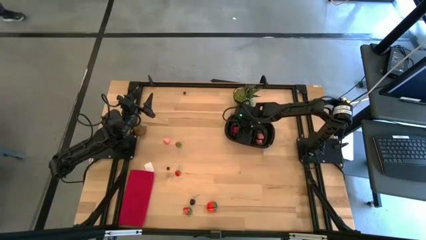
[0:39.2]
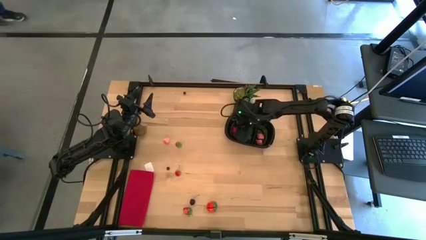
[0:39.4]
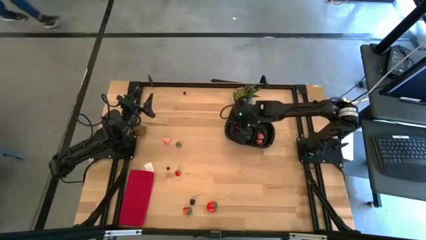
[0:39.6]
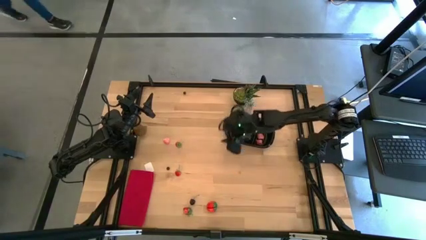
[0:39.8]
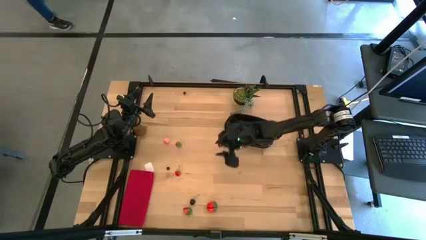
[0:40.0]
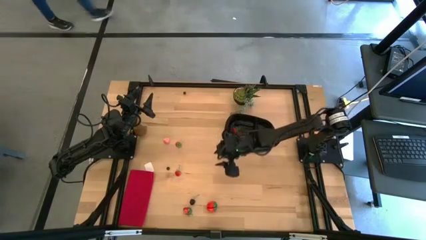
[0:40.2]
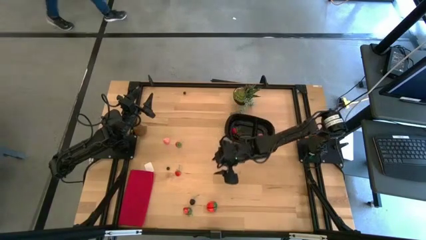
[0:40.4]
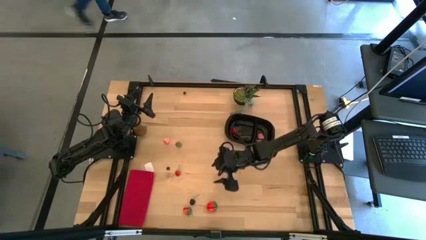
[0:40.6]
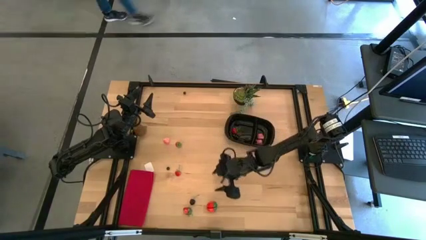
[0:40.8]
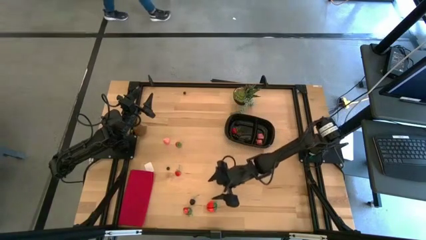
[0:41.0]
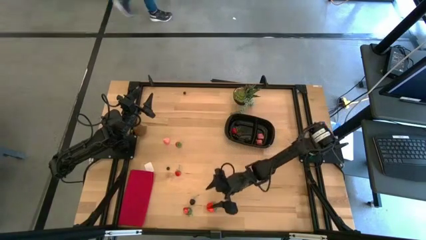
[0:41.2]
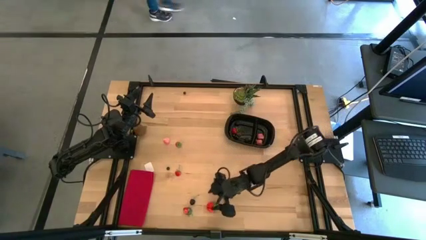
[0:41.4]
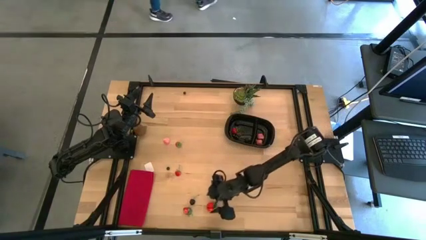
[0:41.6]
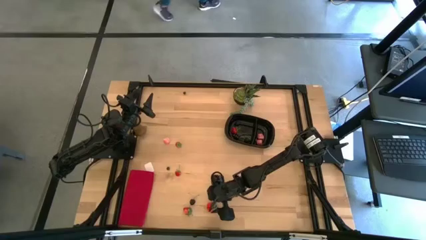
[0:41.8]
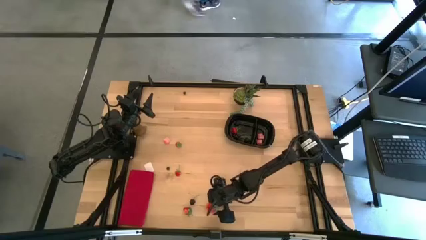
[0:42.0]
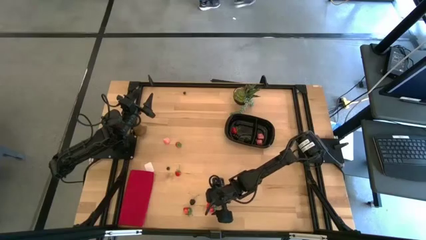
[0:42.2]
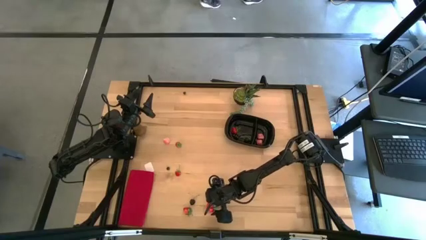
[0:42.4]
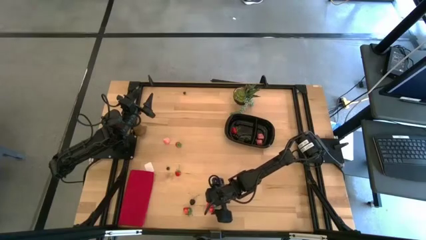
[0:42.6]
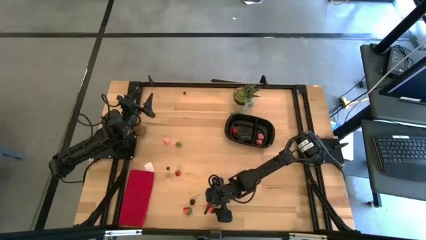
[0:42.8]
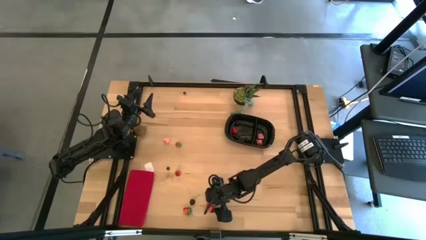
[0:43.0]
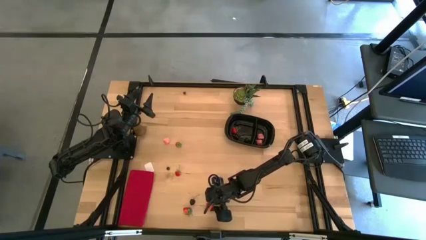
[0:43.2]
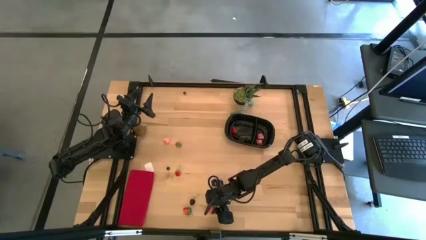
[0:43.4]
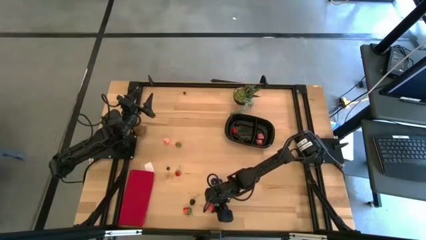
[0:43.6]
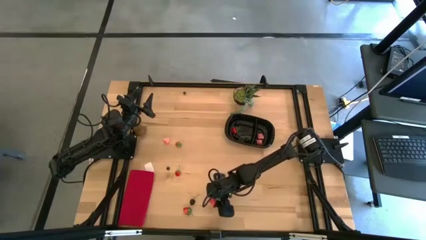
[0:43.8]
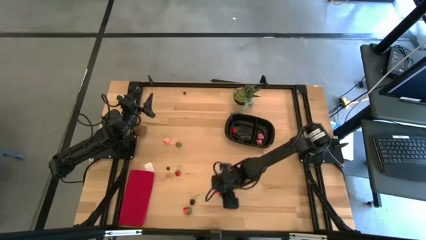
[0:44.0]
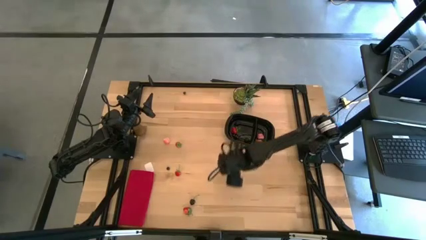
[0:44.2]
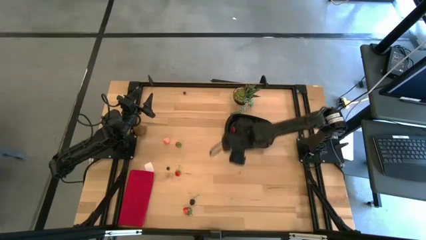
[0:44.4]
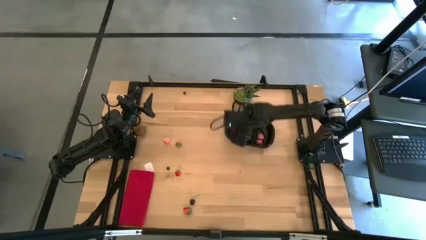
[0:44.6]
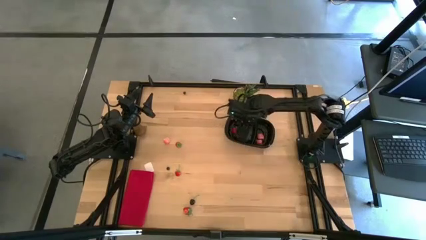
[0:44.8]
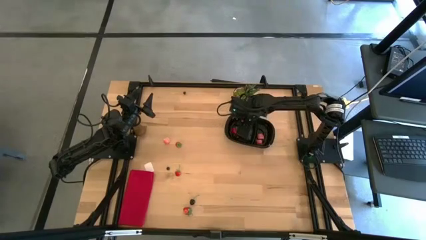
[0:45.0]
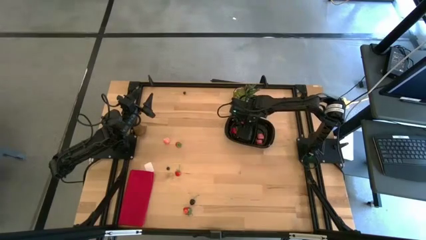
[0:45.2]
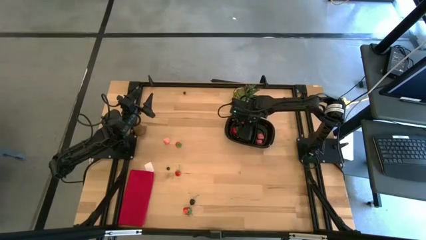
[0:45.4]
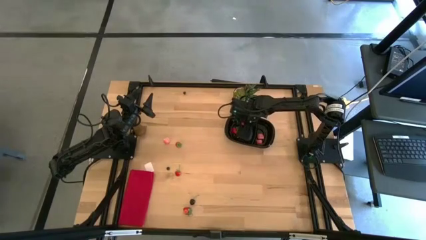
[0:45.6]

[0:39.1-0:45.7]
Task: Pick and placing Produce into tupperware
Put the red strawberry into the of the black bin

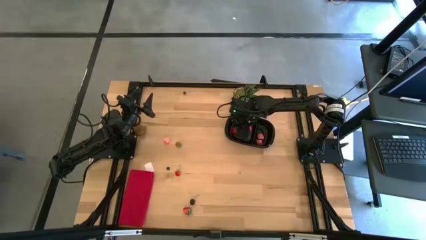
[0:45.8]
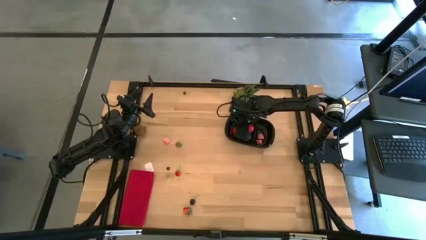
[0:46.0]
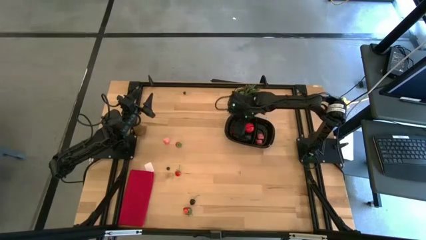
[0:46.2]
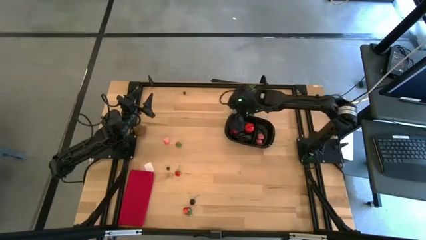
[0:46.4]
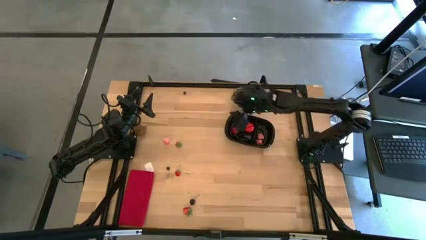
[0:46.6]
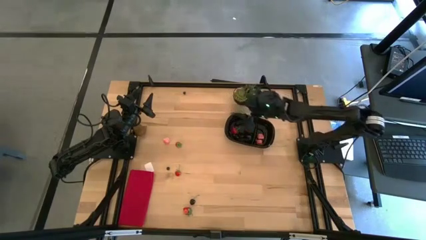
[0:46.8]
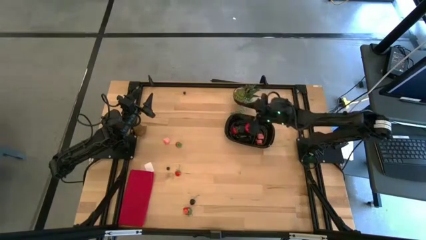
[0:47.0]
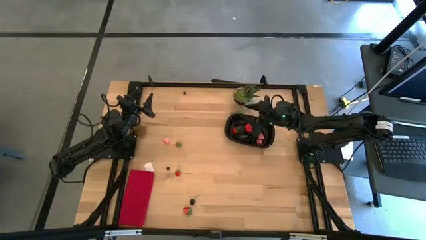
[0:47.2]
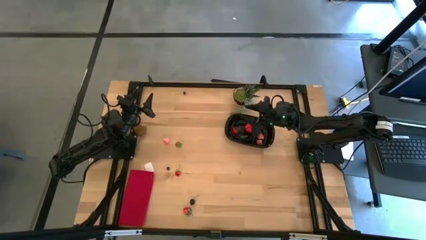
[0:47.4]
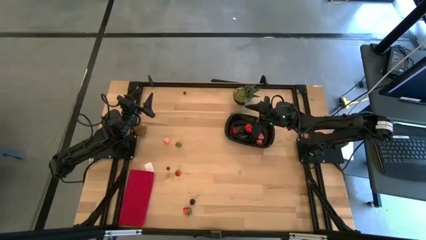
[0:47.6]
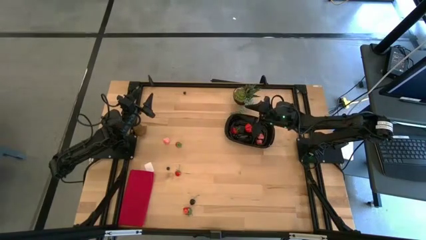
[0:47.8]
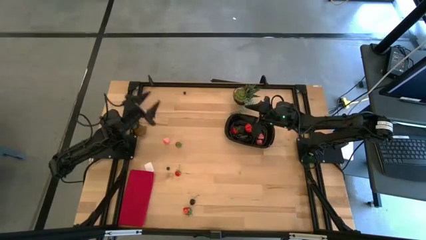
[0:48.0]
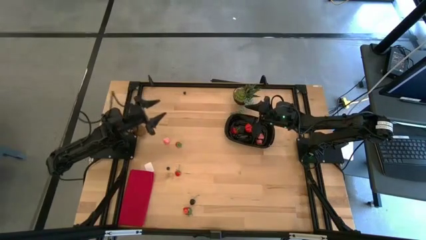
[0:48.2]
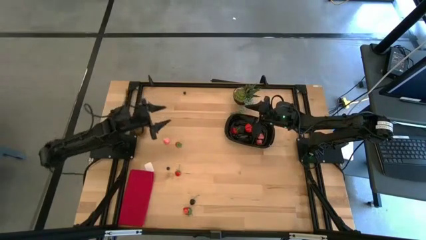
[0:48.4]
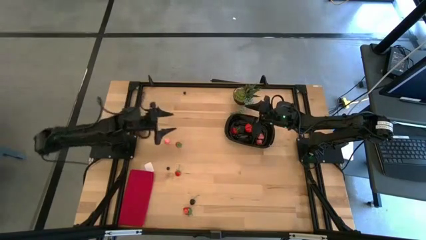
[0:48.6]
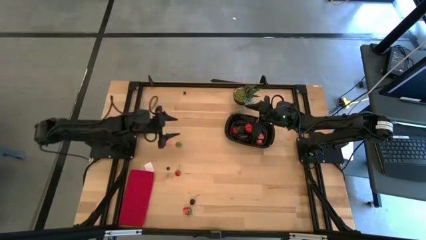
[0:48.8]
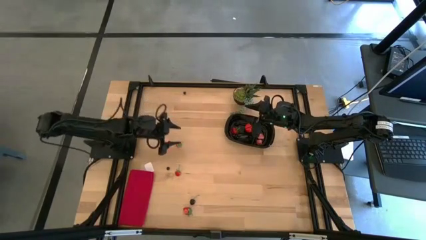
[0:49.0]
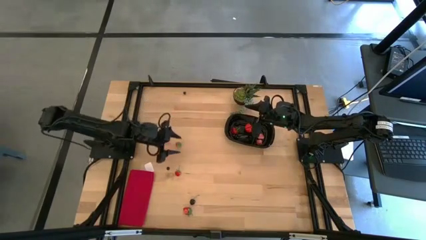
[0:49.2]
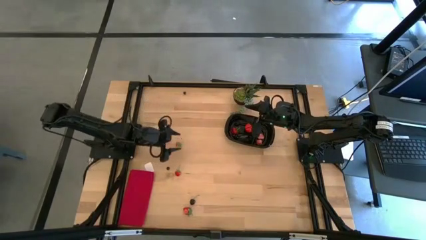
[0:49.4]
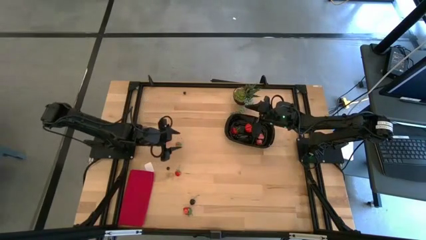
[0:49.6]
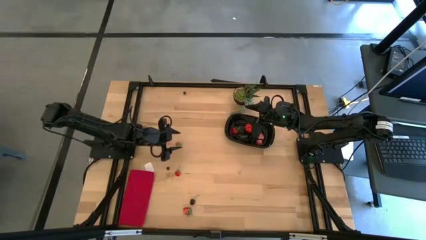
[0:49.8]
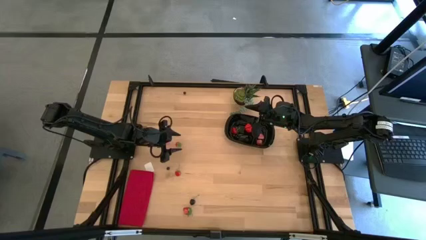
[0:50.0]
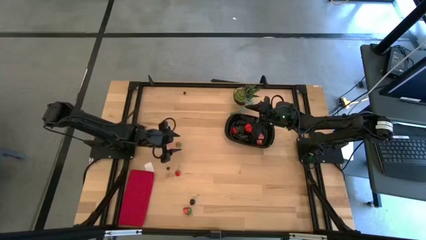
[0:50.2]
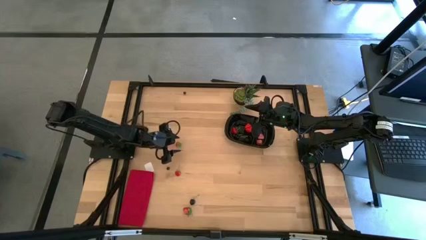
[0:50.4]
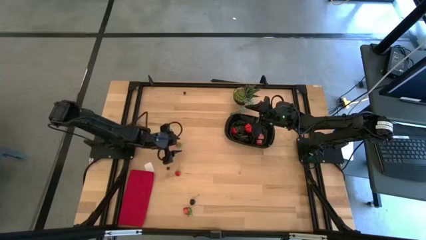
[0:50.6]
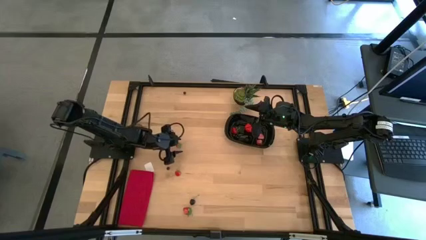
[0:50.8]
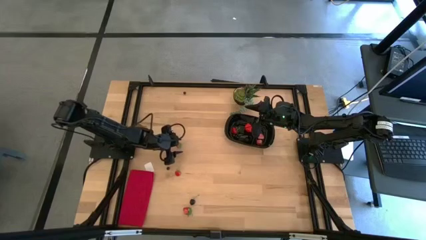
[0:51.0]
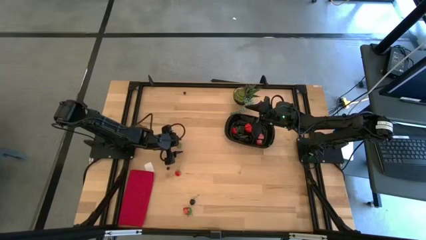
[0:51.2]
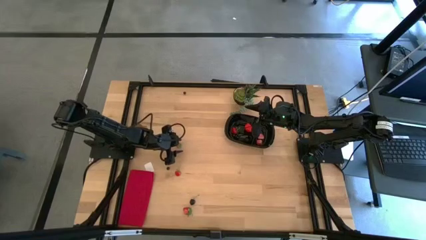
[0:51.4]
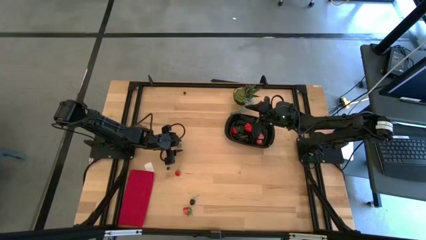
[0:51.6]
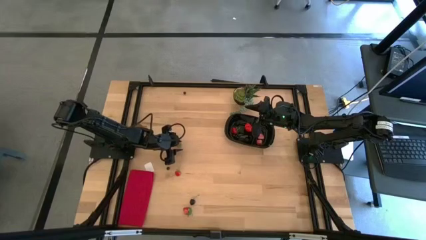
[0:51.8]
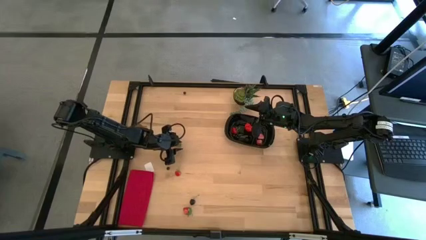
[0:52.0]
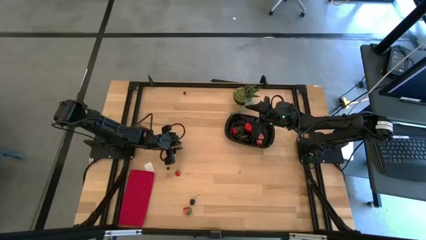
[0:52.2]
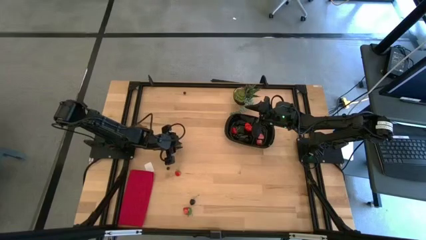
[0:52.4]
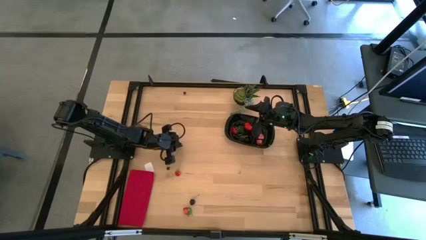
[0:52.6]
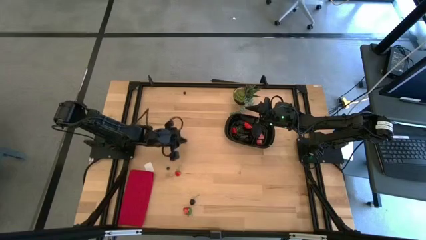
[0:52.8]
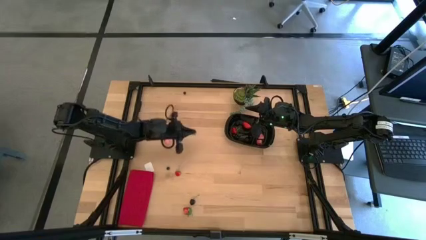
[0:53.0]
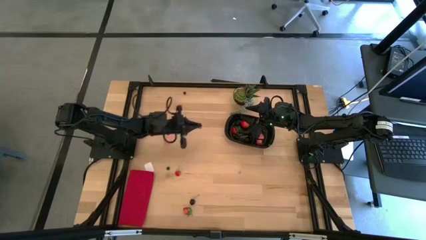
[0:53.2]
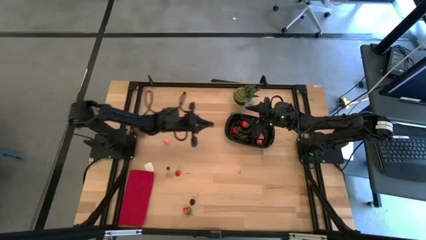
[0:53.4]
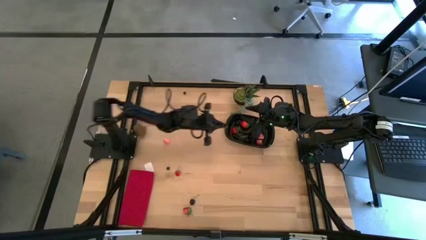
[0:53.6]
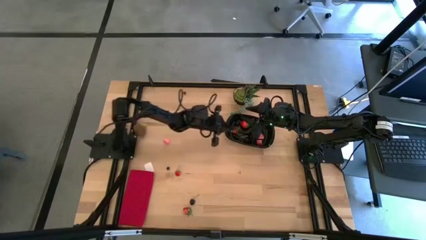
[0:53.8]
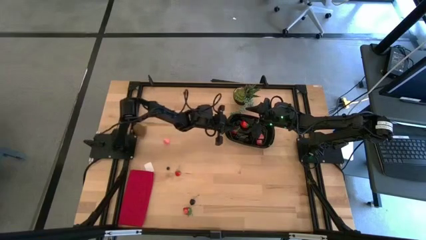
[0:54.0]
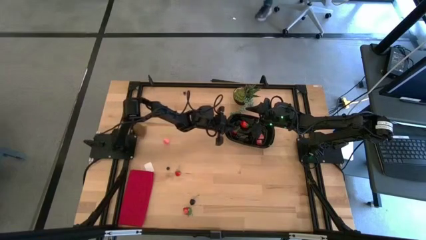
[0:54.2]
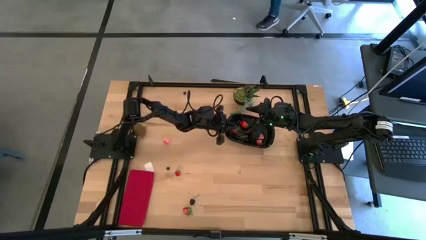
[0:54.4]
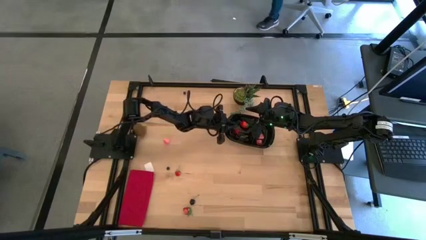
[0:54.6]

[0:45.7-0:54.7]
Put the red strawberry into the of the black bin

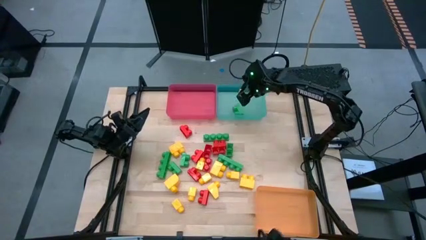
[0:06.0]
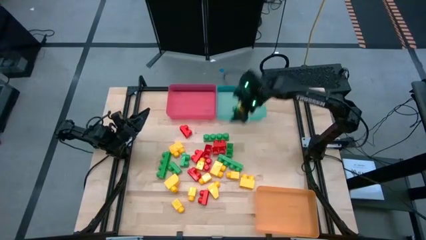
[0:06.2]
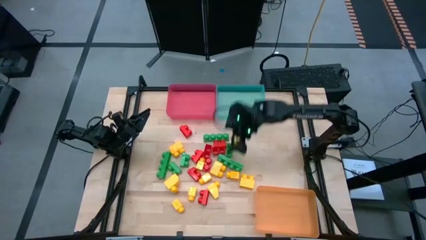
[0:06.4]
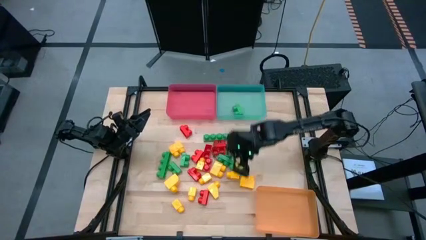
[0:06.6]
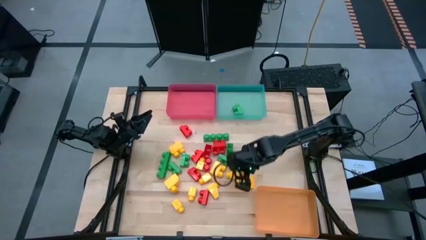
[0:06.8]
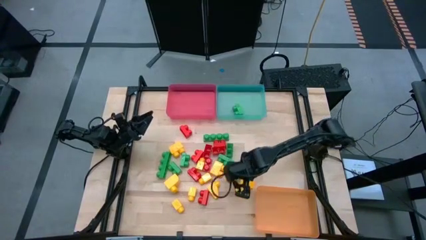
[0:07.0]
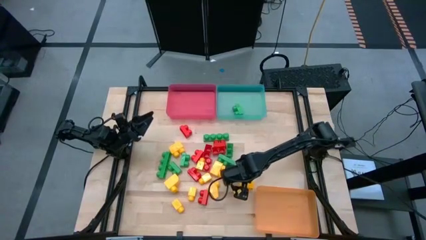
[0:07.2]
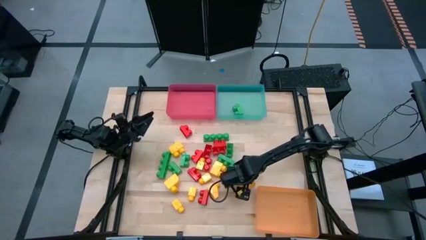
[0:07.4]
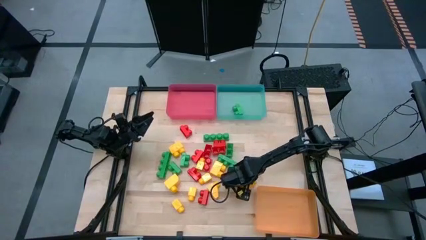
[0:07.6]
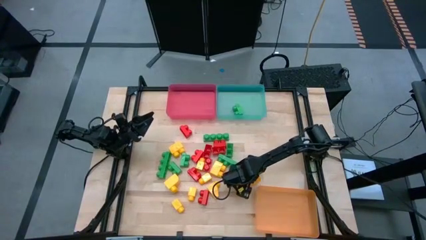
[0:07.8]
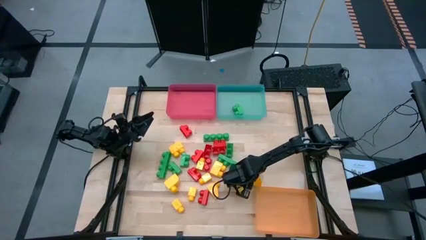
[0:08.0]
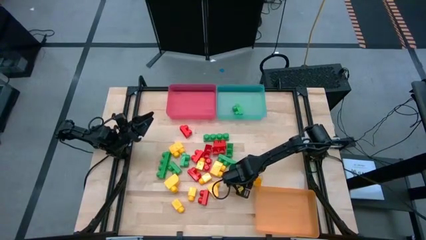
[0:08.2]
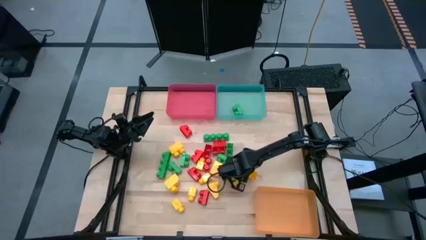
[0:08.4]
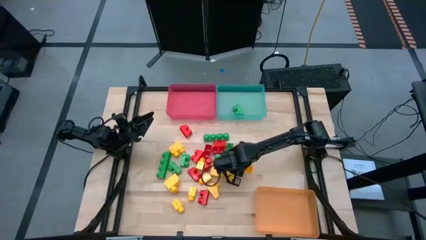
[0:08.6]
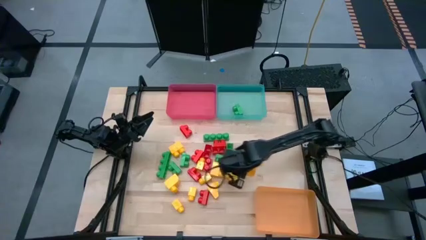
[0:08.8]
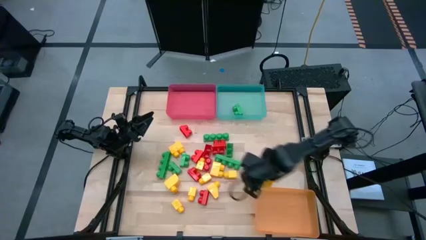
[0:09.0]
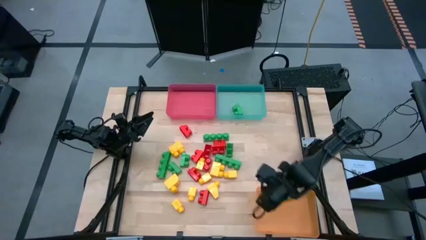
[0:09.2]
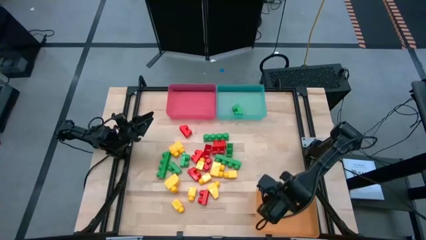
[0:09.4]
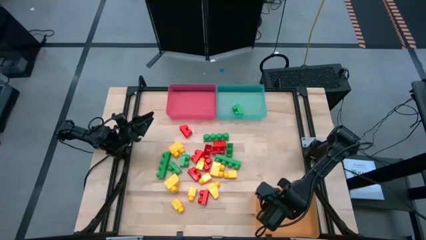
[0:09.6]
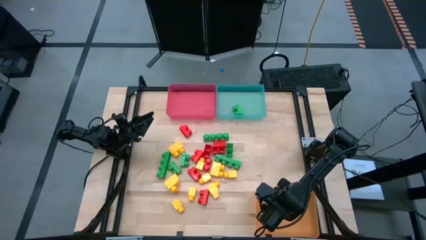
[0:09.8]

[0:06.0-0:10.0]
Task: Sort blocks
Put the yellow game piece into the yellow bin
